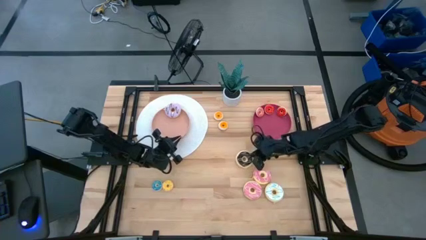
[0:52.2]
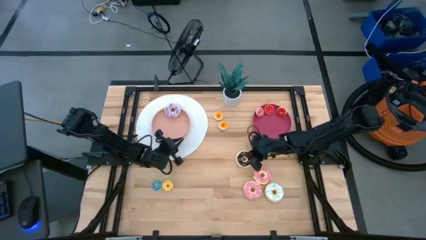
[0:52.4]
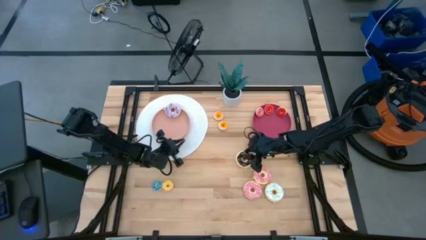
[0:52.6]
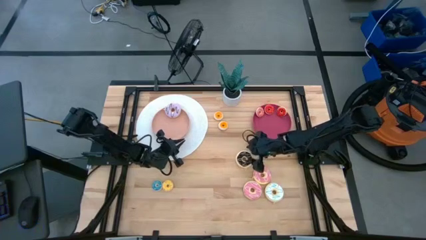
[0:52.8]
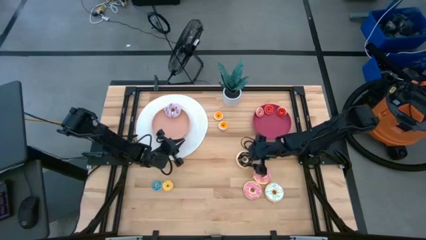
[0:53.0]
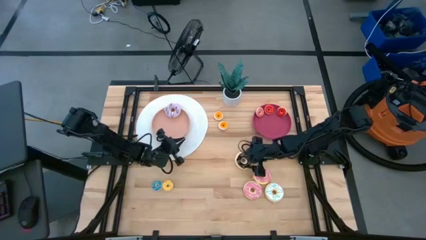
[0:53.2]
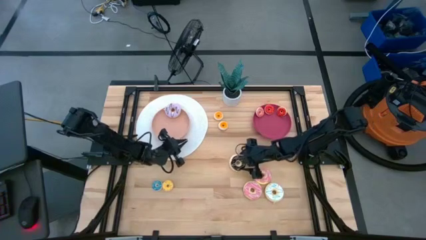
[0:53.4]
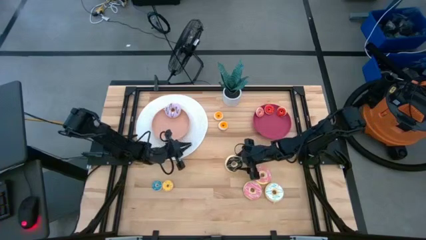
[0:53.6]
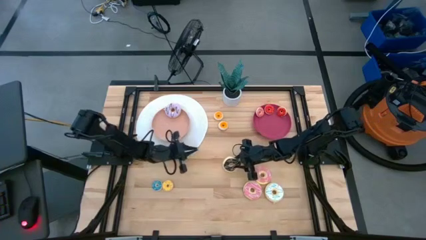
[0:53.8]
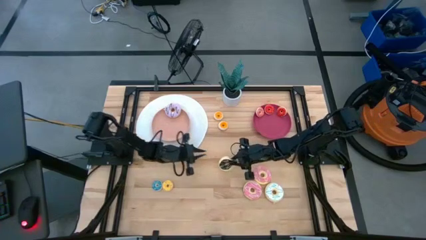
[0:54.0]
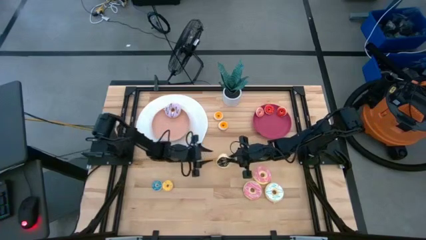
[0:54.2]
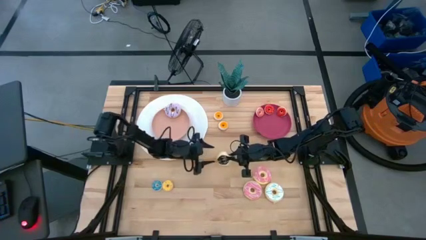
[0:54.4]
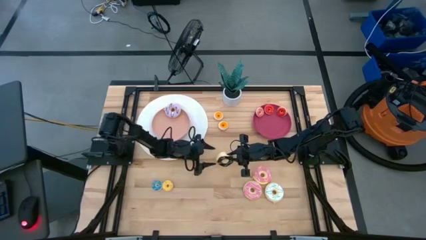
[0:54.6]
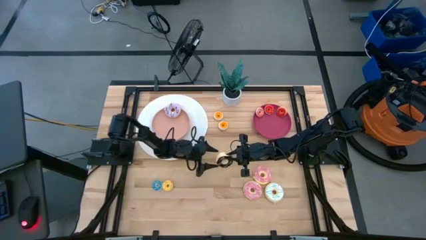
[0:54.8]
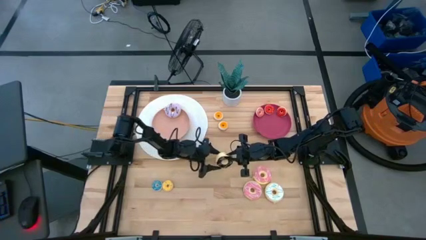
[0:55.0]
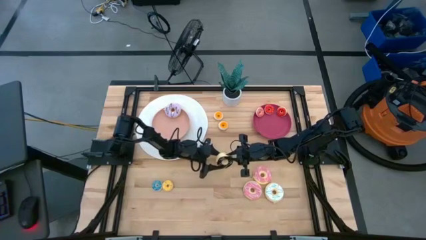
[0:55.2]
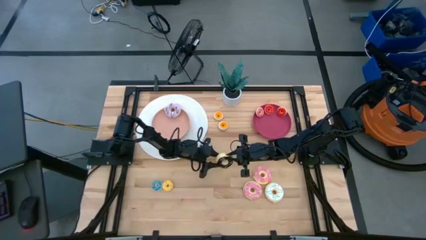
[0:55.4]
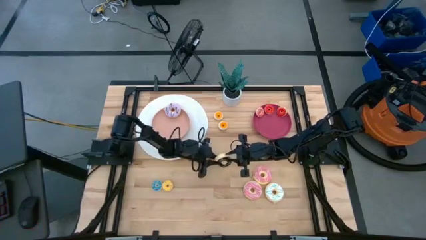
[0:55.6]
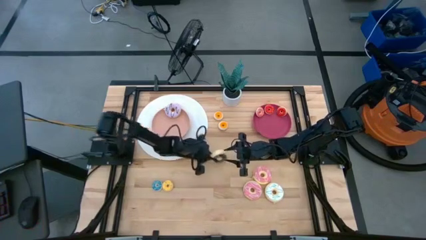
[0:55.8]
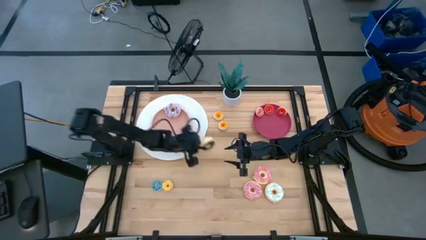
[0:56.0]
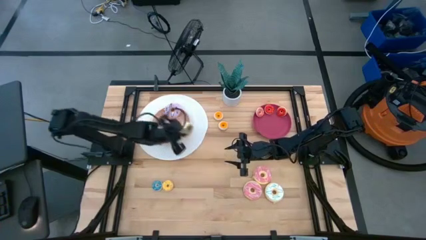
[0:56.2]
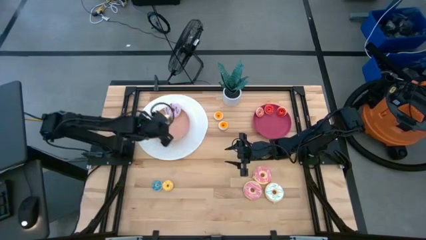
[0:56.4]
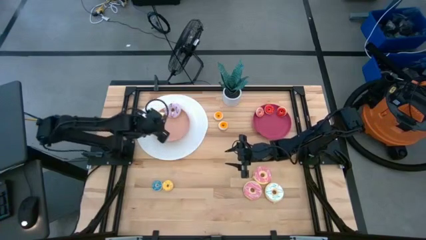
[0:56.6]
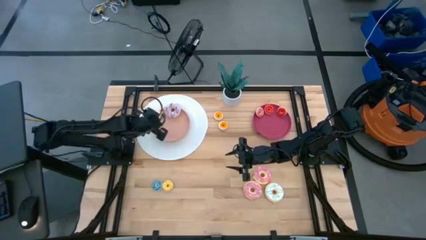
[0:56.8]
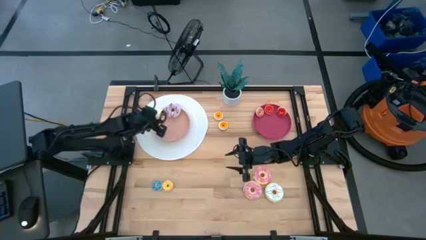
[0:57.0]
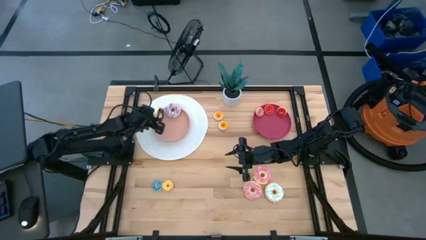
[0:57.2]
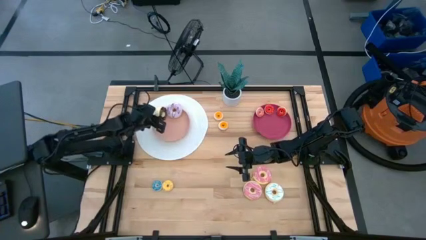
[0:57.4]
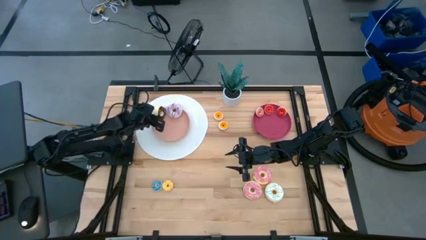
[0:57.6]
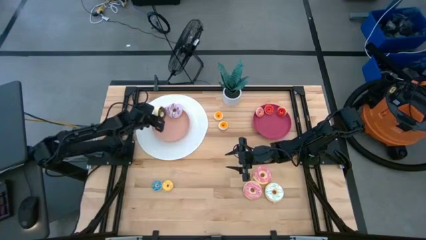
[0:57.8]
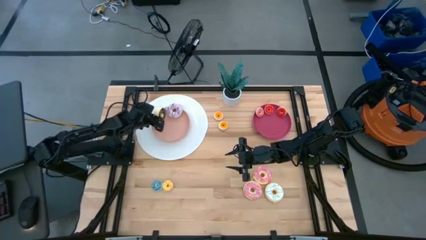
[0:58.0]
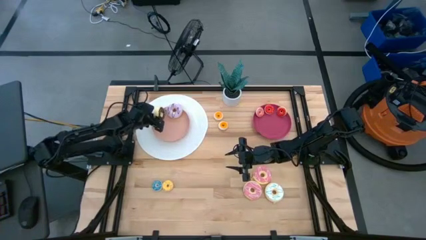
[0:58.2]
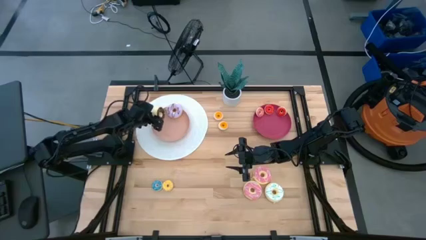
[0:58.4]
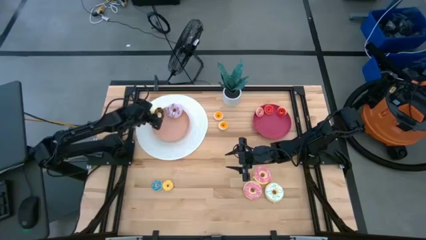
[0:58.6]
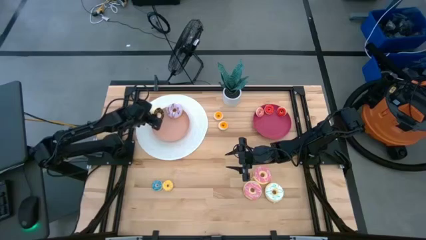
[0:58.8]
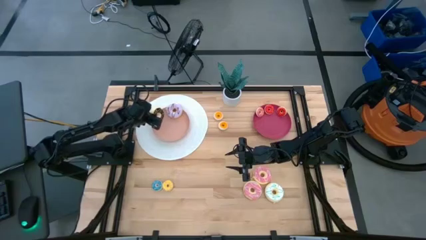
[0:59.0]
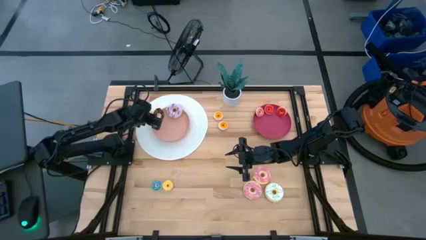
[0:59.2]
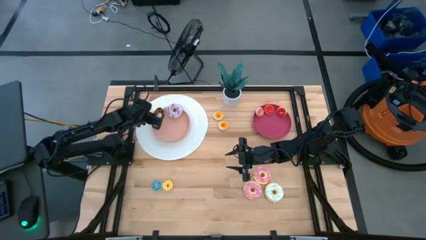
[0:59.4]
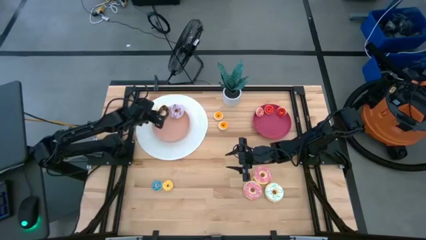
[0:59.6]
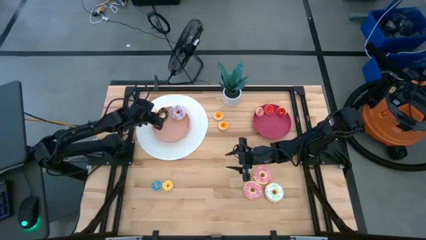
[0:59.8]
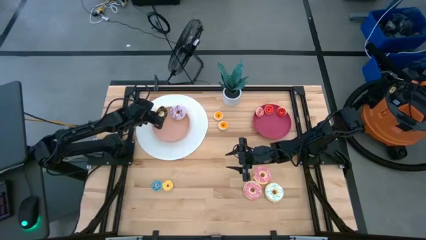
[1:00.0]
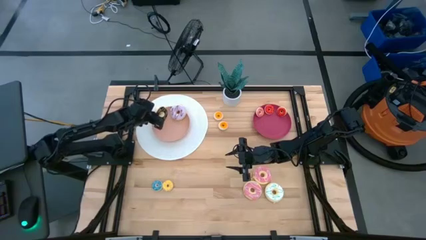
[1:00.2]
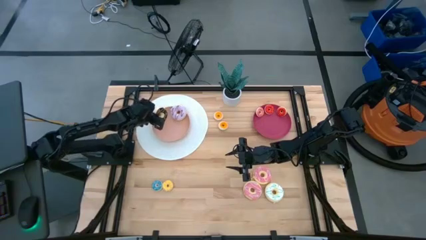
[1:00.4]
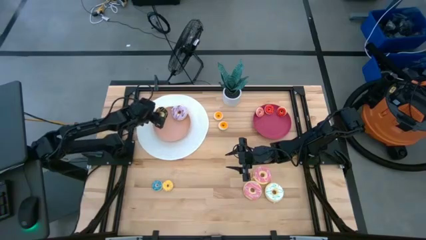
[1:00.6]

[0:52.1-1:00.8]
Task: Pick & Place donuts
Put the large black donut on the pink plate

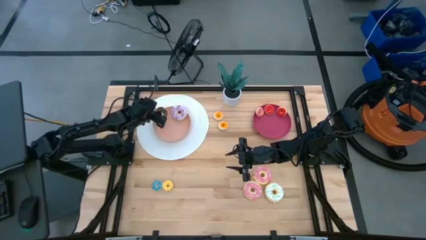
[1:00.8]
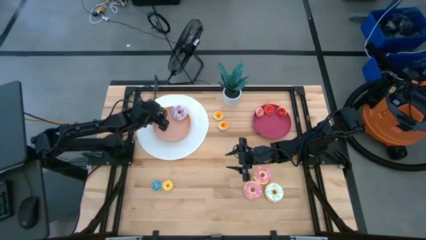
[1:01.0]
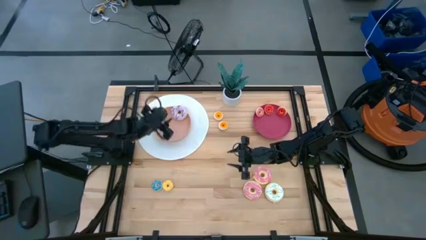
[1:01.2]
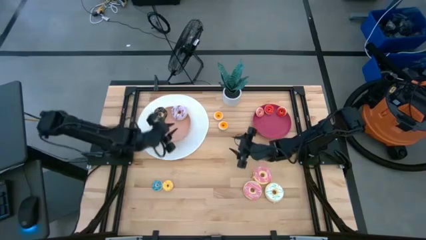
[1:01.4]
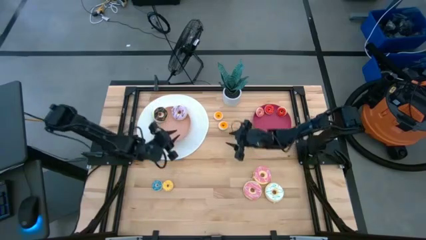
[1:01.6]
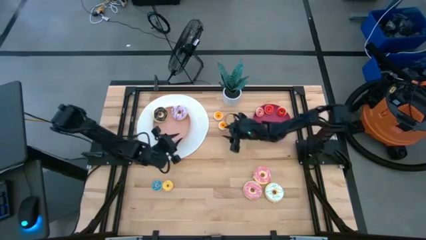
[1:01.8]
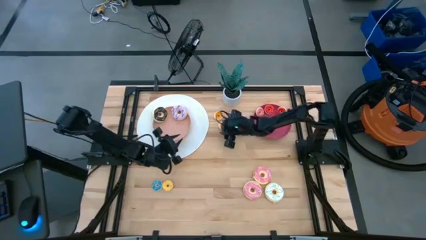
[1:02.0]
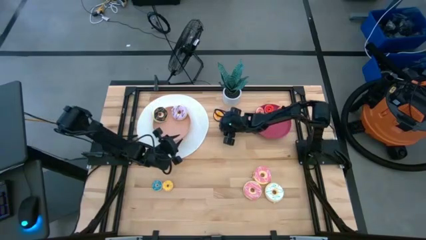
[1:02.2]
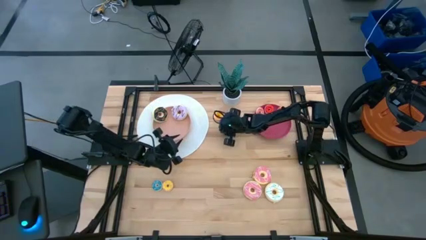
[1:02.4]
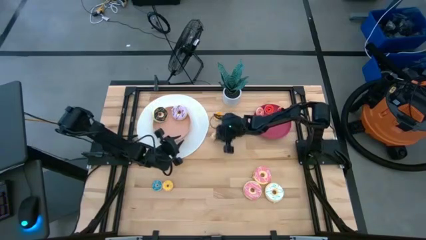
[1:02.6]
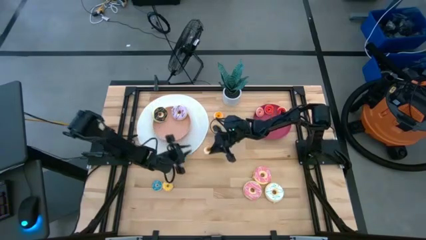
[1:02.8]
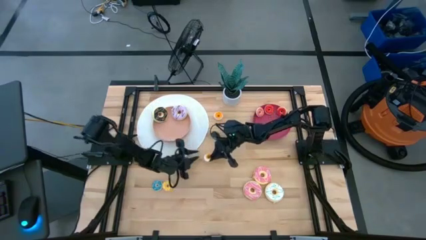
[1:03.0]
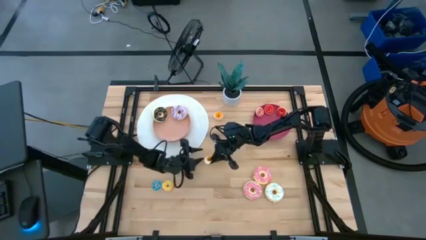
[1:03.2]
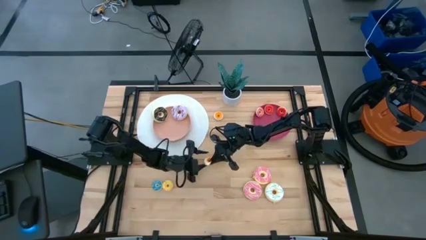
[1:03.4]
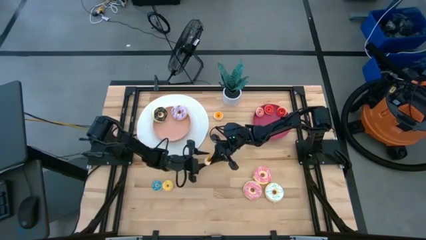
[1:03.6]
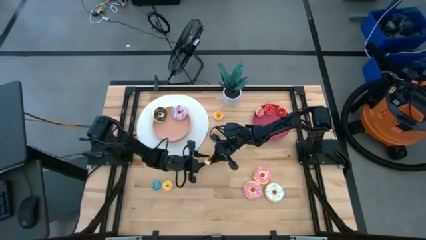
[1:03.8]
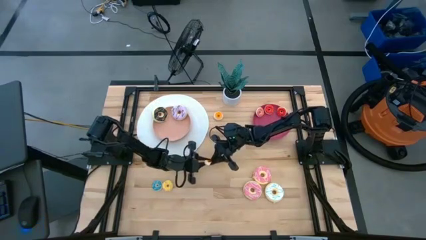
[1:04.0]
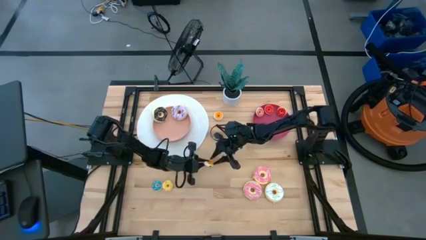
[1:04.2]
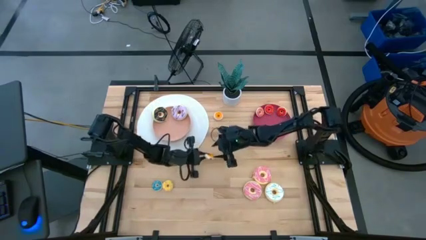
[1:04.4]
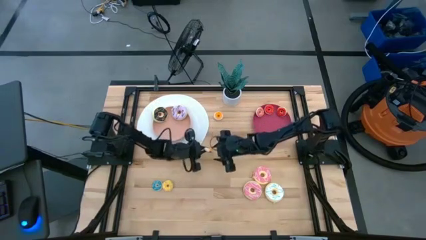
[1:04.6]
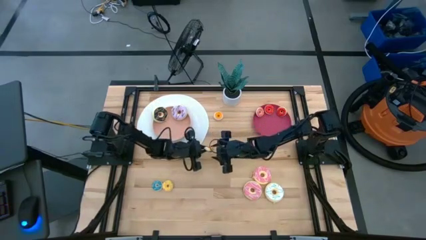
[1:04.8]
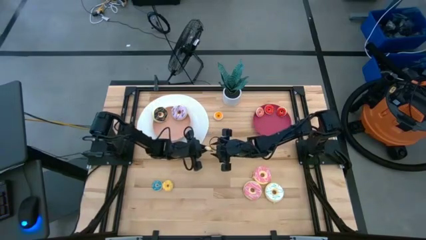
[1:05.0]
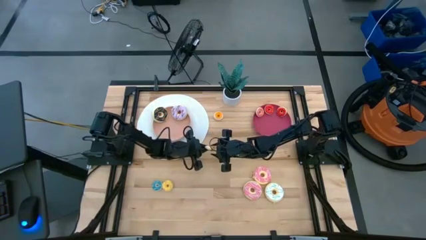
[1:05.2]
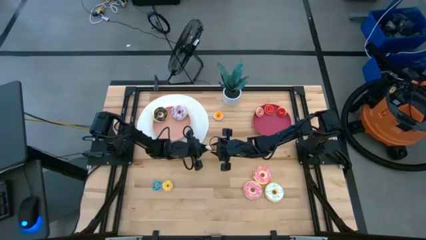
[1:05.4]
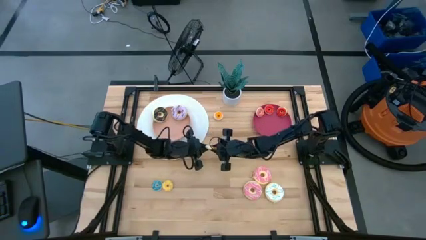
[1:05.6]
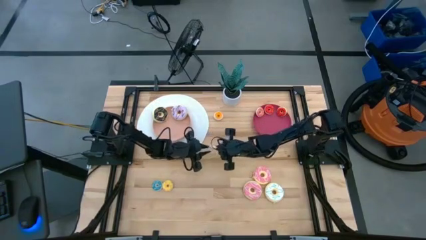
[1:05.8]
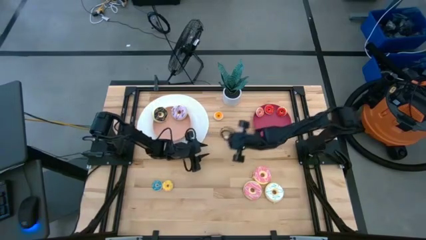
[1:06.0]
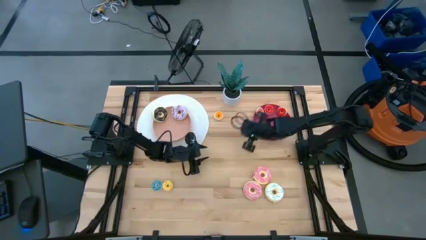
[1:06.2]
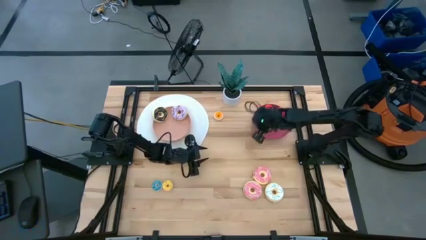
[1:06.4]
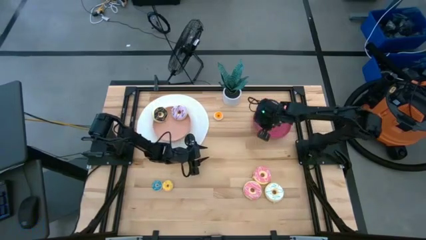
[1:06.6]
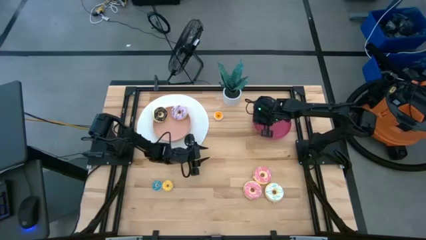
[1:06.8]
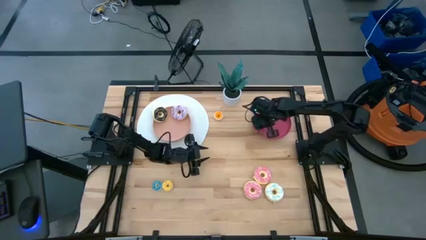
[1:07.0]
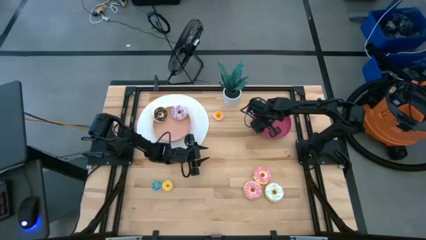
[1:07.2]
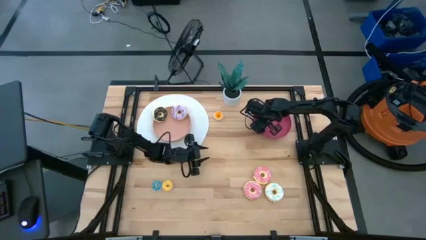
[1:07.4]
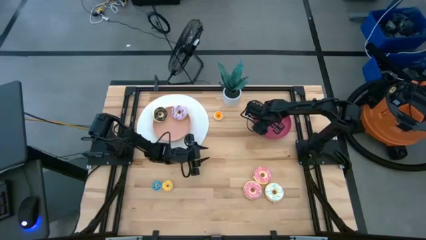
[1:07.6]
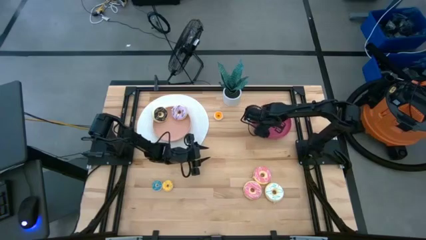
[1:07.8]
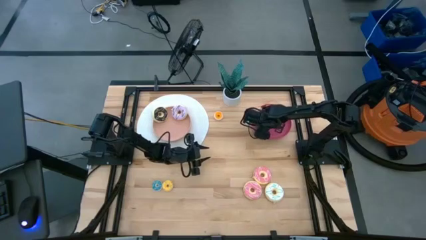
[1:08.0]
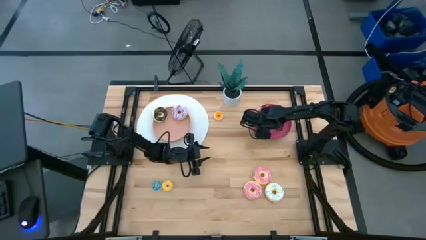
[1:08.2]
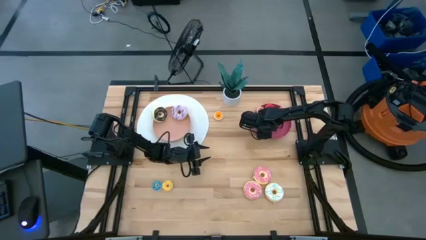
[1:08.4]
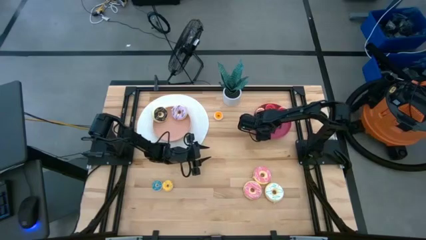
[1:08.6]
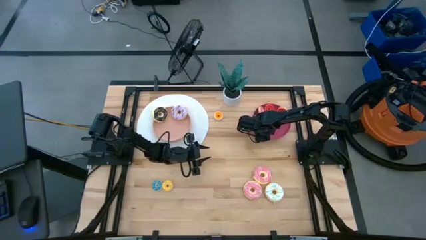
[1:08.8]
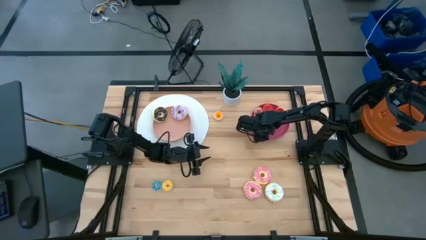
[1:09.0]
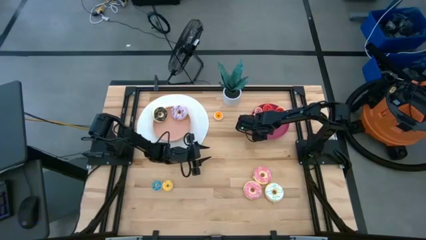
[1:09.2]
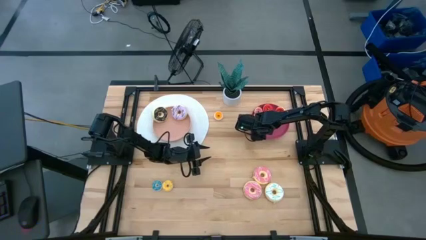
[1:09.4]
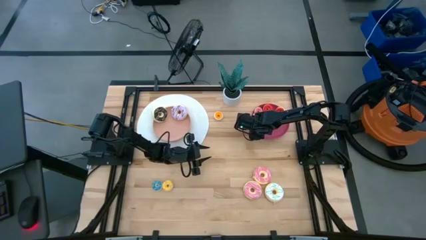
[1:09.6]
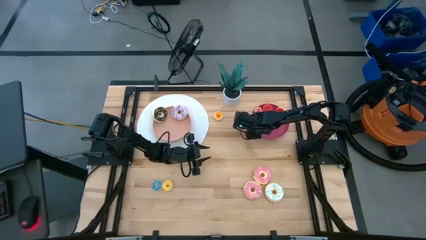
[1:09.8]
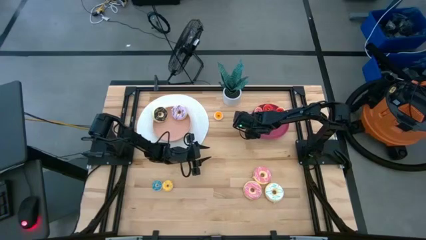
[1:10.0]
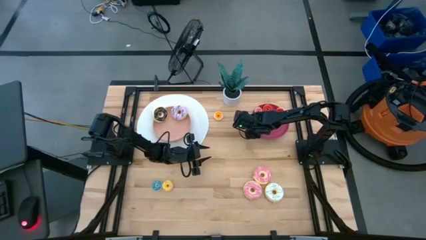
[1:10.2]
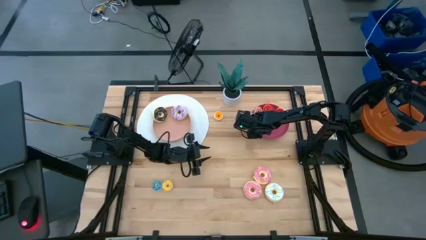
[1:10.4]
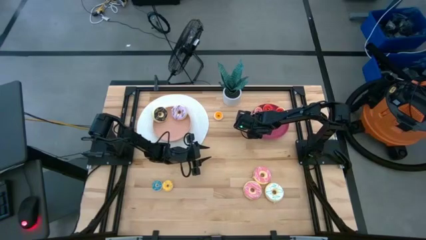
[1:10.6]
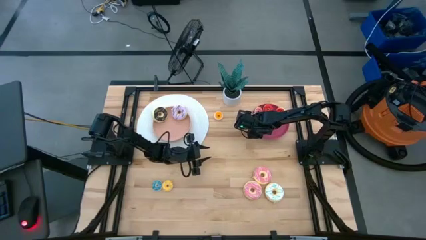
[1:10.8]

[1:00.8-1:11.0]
Put the small brown donut on the red plate
